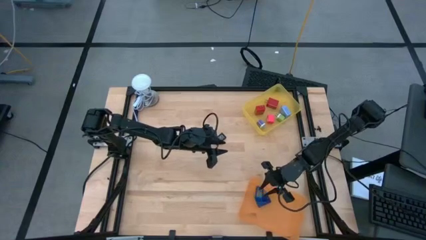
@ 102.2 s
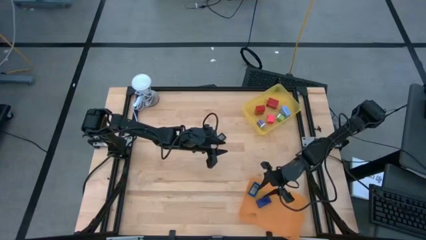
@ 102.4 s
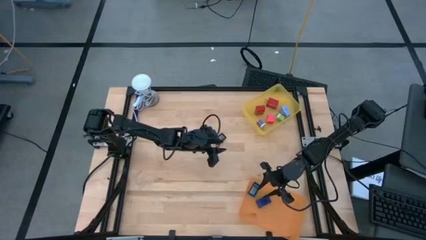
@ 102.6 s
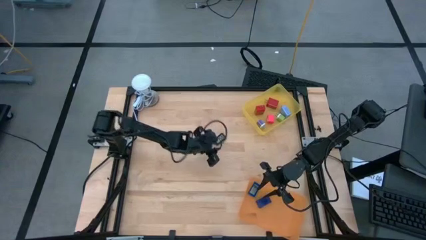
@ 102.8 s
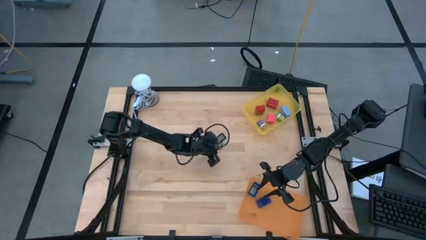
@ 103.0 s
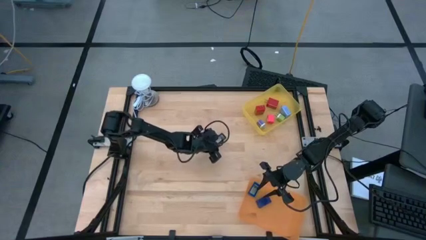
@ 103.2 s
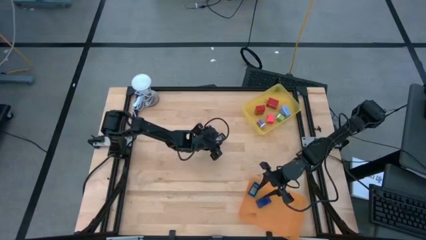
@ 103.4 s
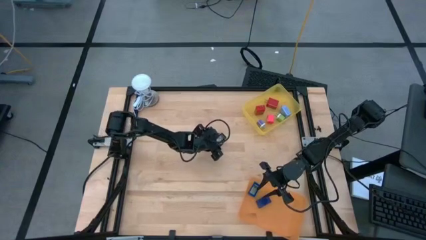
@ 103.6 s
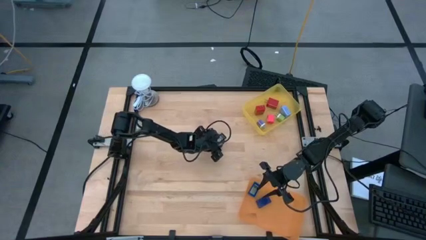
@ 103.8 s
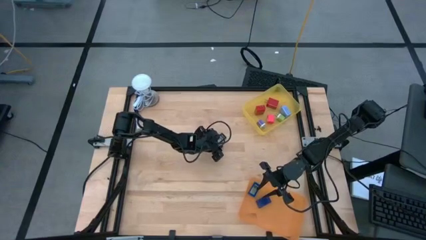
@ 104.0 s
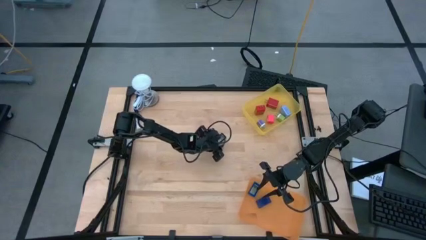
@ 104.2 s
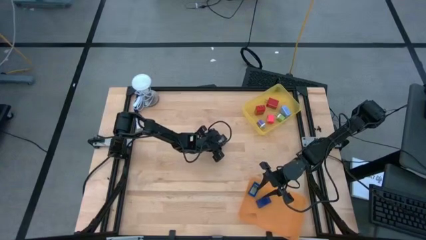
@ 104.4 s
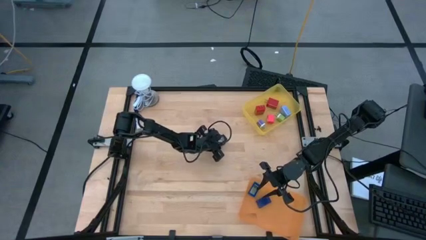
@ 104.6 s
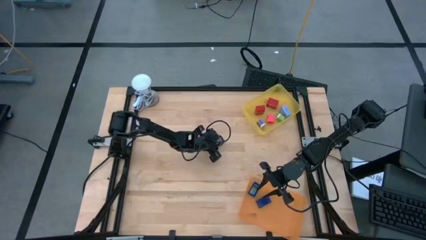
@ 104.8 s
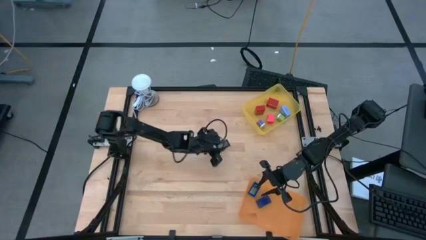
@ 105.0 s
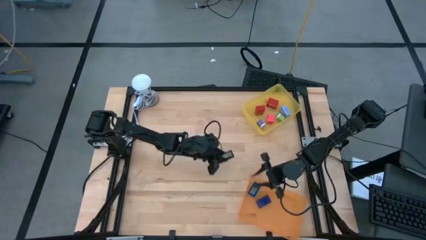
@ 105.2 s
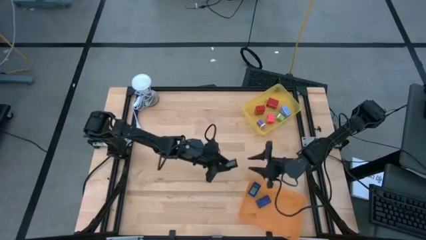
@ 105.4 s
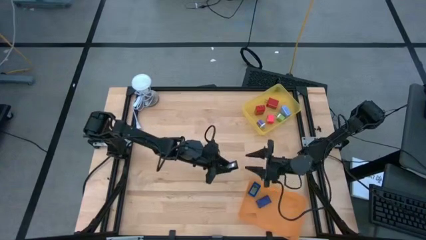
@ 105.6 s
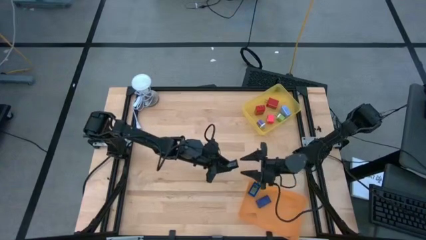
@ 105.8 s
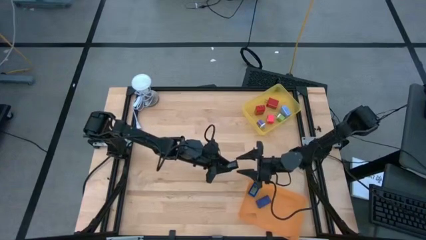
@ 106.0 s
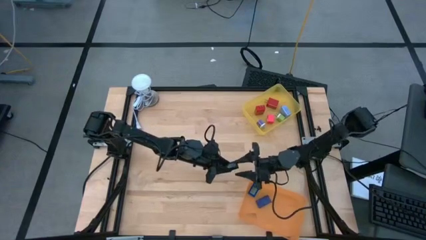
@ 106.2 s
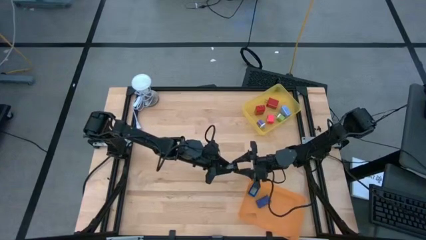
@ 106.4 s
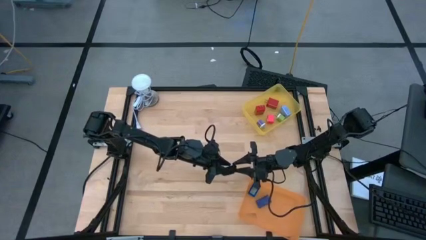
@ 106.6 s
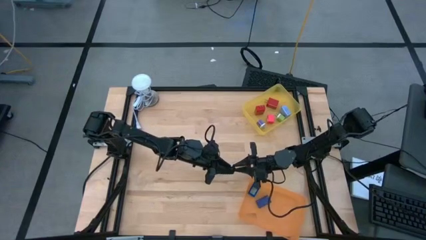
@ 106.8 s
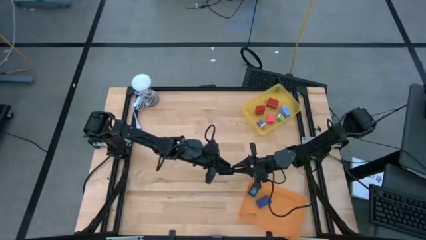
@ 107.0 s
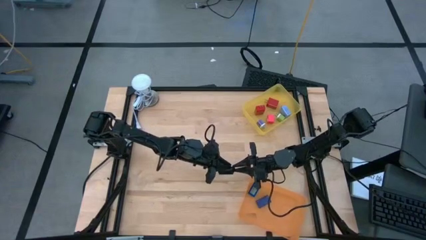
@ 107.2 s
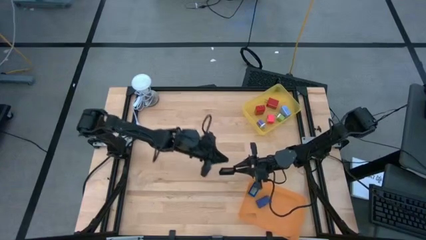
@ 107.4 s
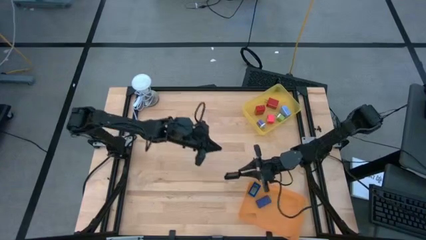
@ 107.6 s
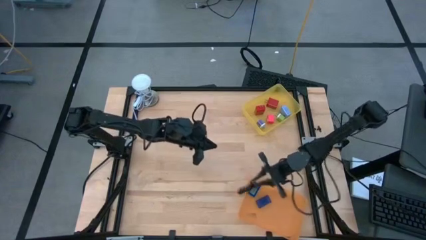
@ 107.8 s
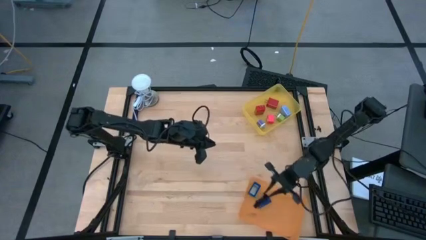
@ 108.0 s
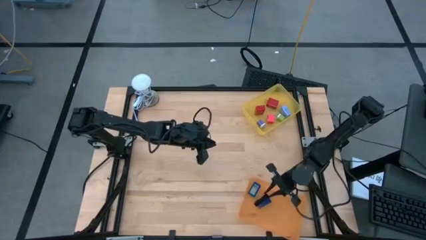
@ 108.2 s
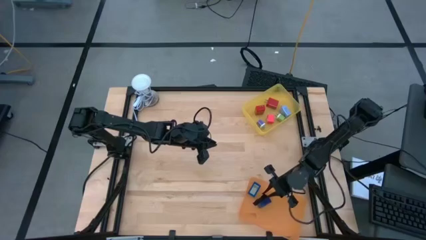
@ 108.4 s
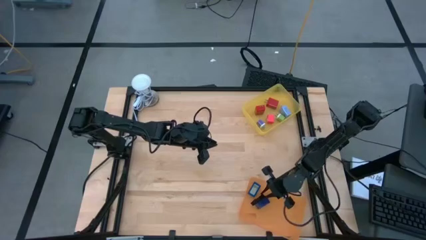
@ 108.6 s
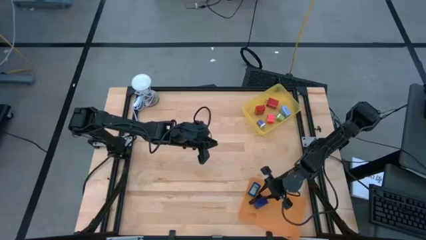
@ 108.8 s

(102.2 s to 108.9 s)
Task: Pick & Place Office items
Put the black digital clock into the orange bin

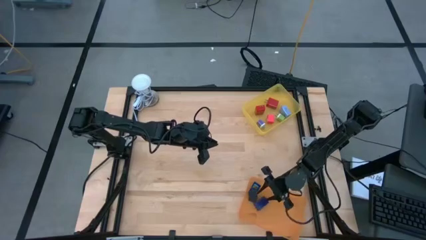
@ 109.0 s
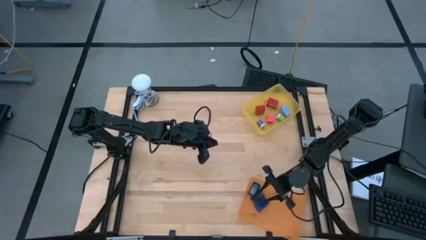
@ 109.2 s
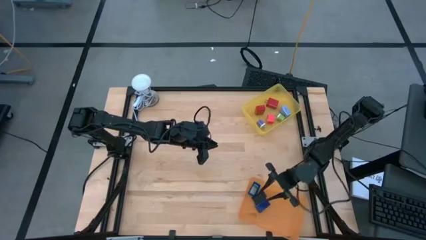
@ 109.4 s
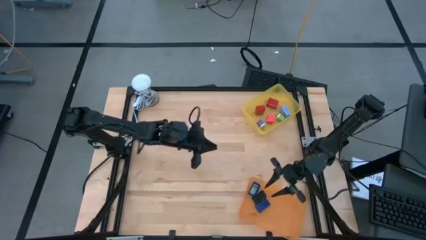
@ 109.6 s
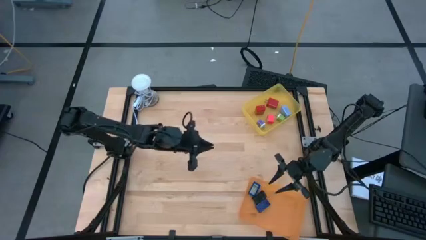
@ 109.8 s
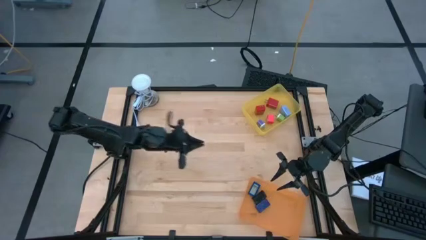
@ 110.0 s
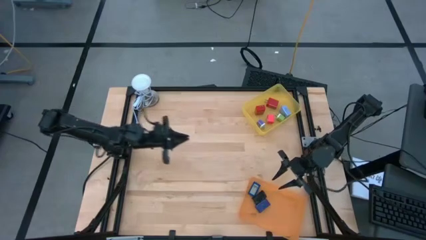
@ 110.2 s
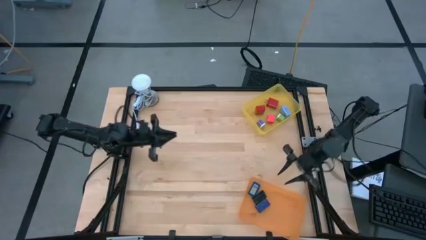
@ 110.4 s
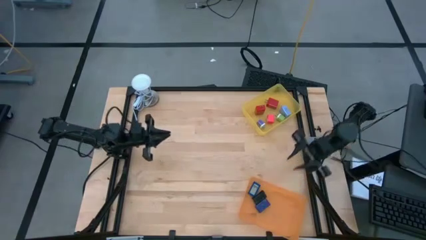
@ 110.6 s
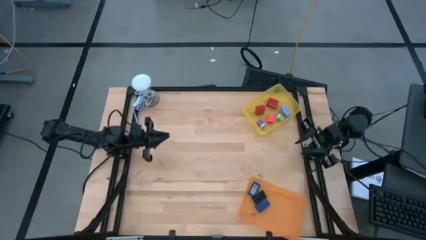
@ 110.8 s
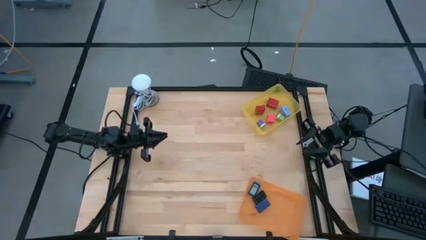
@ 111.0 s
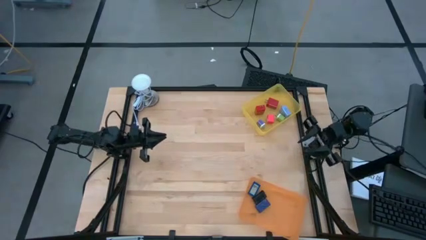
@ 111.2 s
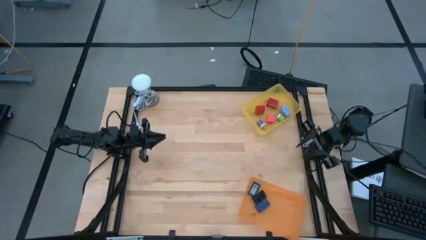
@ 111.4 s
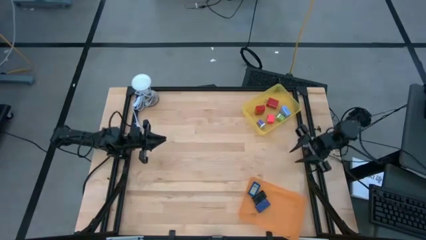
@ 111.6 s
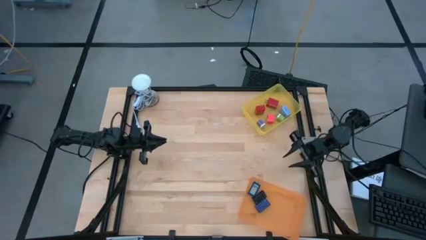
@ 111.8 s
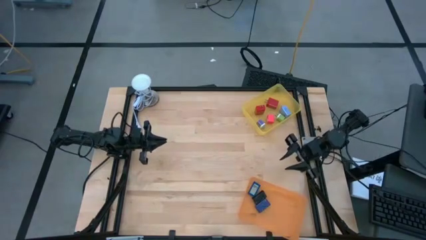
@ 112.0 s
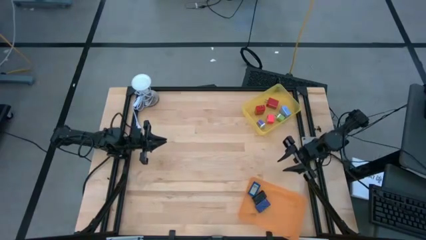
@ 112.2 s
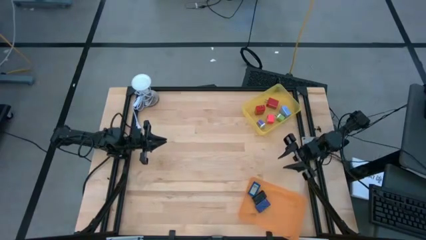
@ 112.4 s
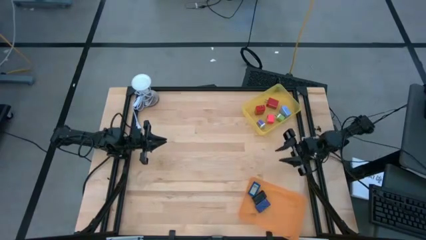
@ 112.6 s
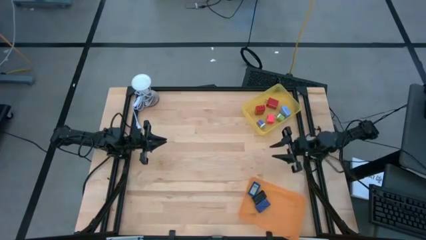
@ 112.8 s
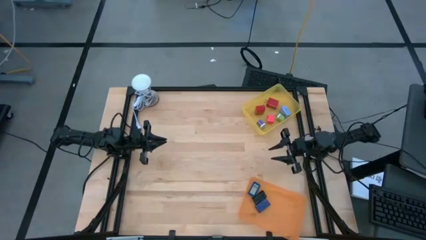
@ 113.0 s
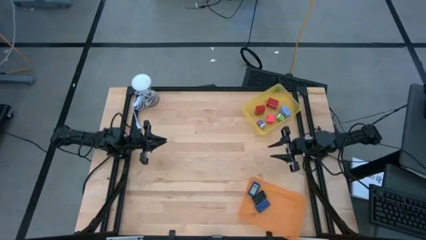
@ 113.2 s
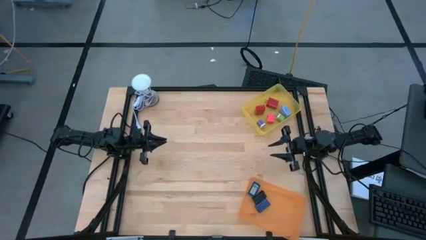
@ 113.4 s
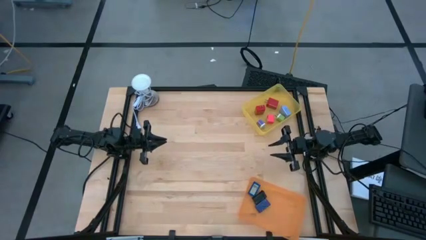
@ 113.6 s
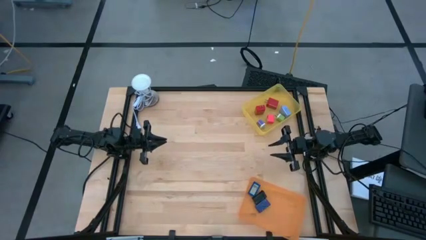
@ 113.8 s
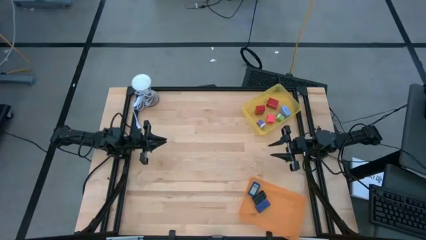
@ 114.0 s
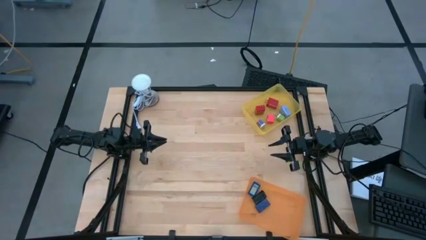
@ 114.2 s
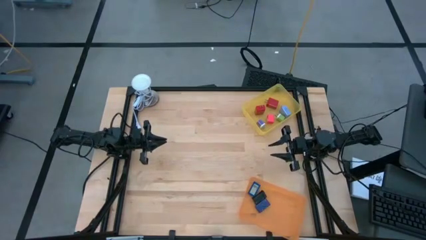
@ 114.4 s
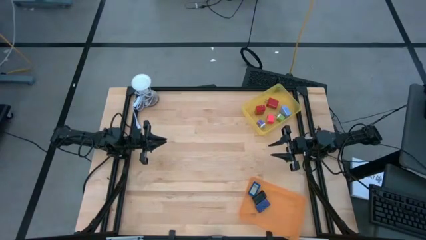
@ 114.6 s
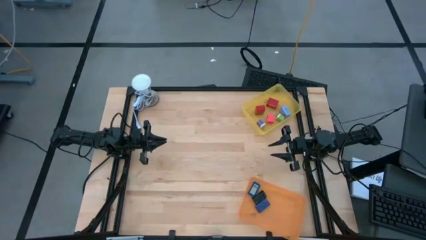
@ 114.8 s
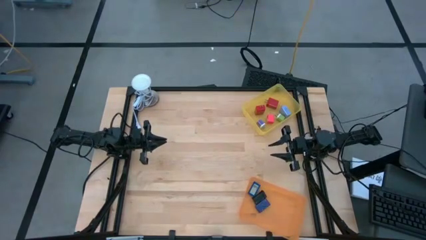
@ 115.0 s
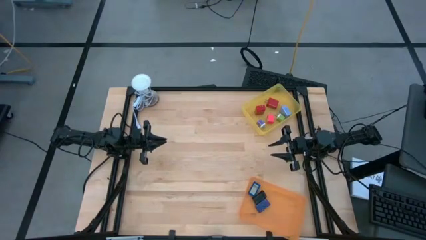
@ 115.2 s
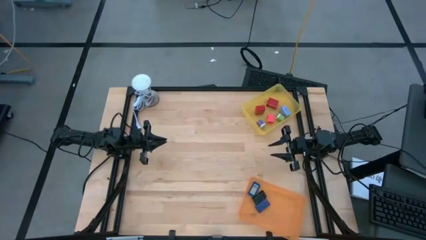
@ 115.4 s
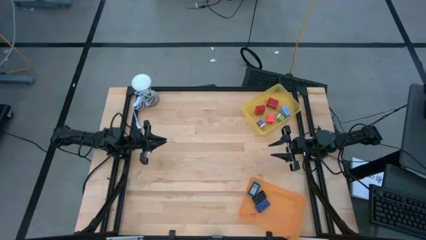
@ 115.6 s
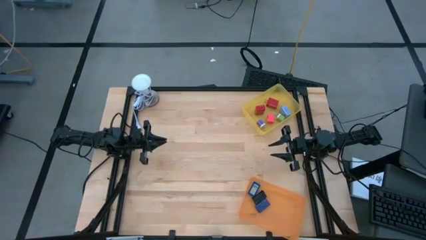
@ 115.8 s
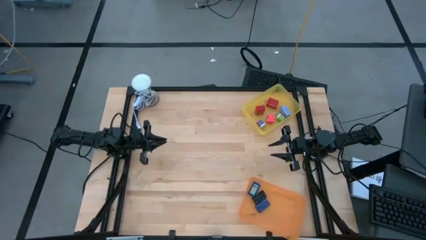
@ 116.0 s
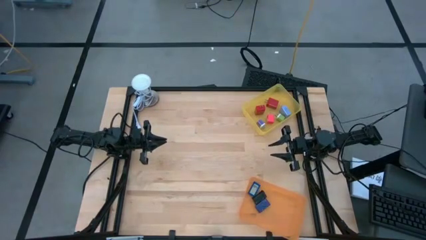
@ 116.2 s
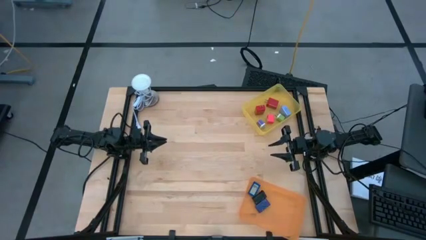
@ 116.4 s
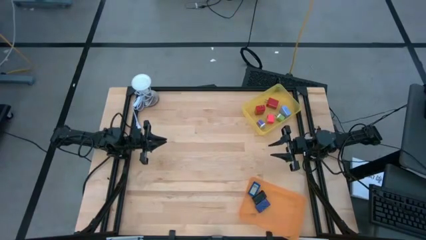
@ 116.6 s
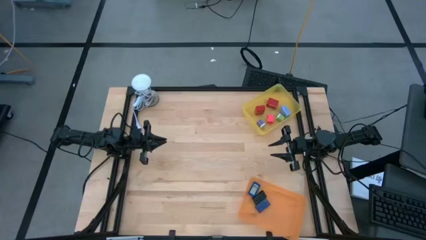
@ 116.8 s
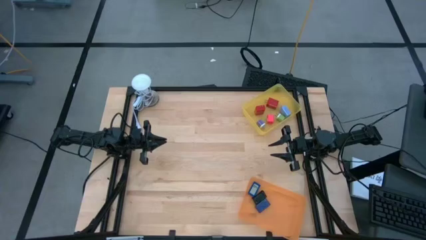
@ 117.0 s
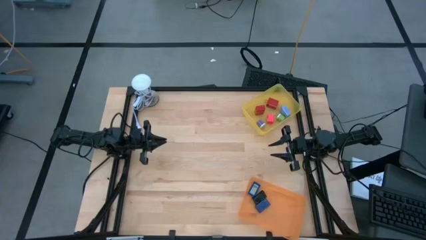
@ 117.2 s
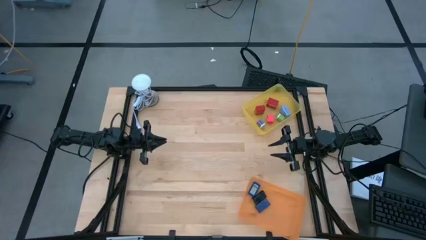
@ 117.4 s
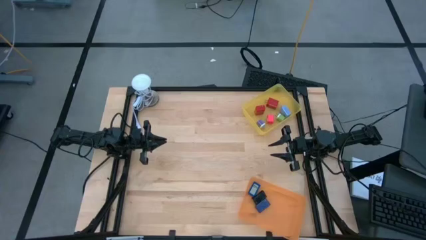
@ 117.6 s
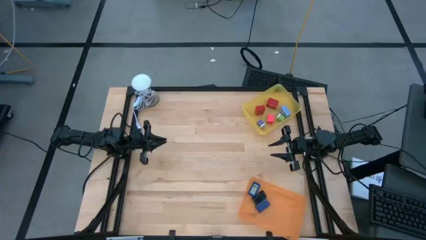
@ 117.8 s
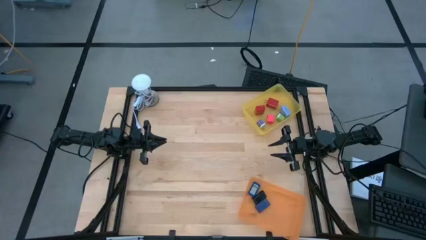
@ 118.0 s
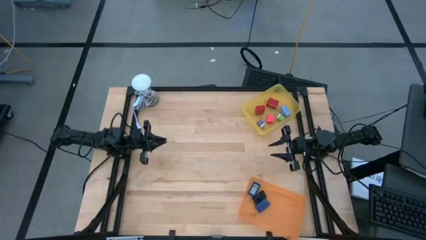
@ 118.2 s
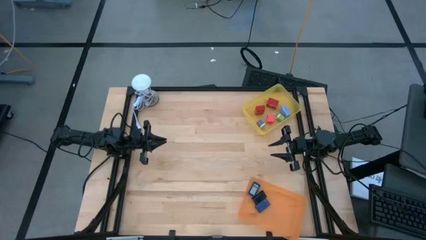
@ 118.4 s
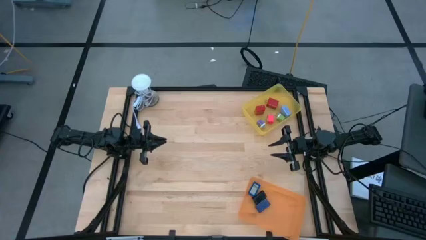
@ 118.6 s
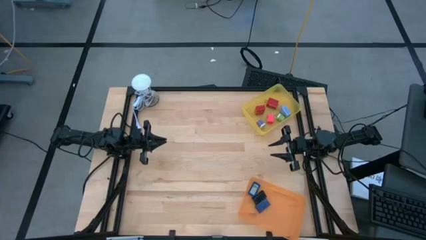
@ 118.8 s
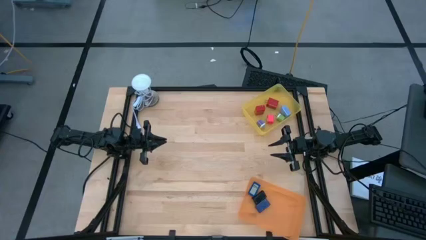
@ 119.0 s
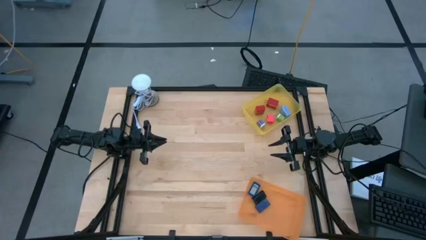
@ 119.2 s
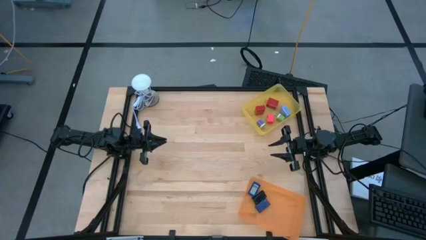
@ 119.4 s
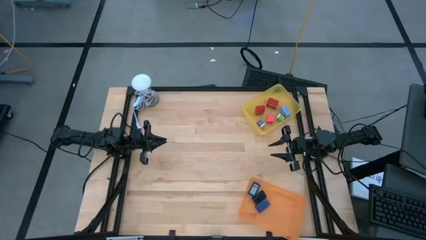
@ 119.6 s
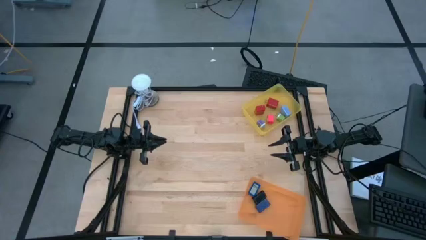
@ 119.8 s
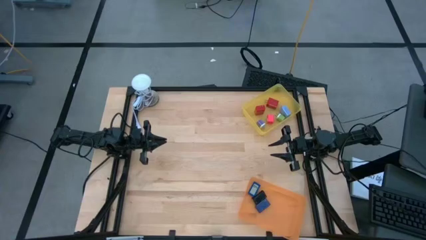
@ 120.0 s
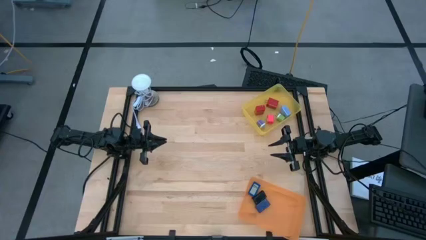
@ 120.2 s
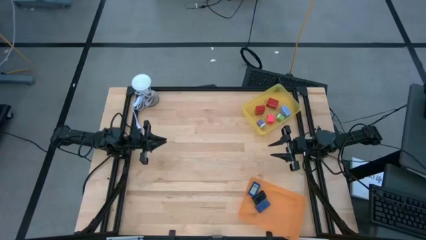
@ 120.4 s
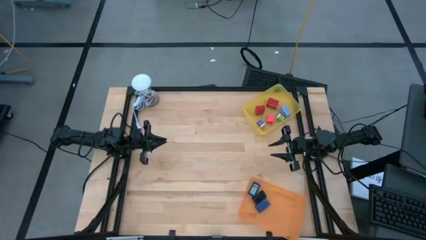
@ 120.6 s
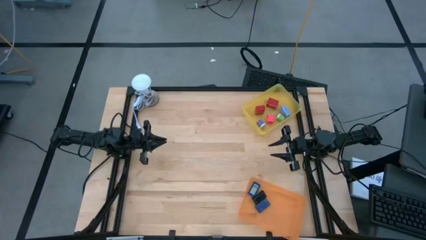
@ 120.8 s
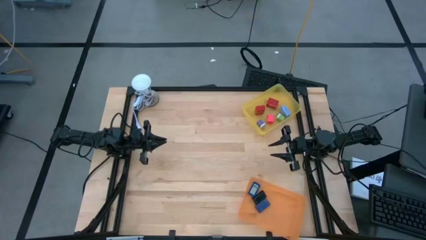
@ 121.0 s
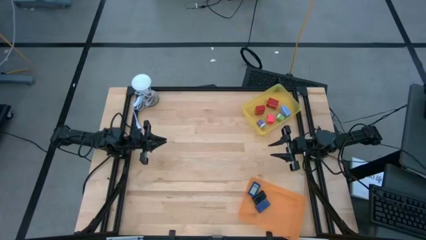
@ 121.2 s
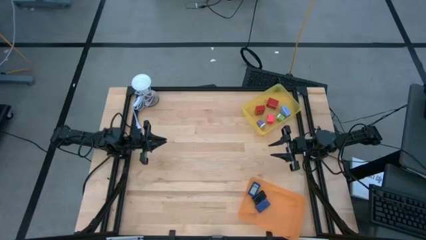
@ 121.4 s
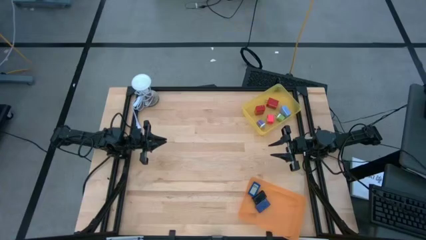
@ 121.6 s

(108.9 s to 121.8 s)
Return to Home Position
